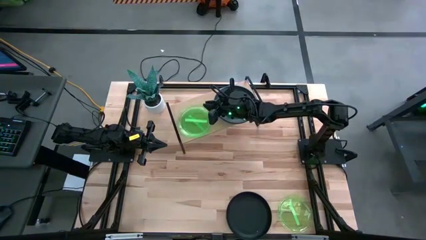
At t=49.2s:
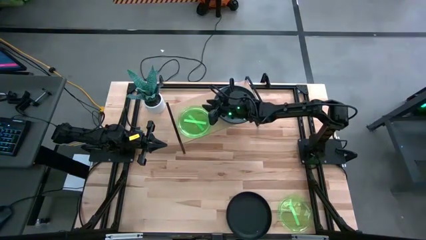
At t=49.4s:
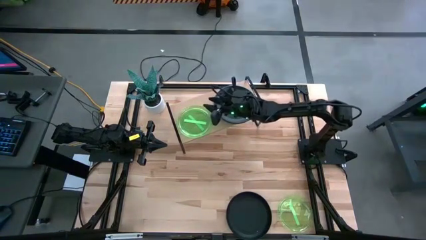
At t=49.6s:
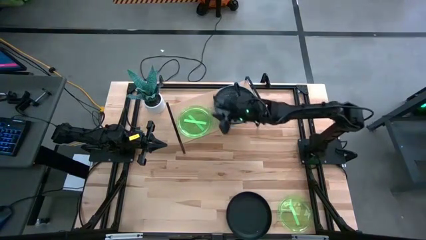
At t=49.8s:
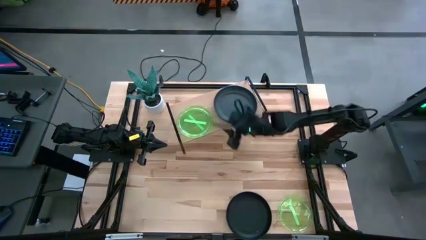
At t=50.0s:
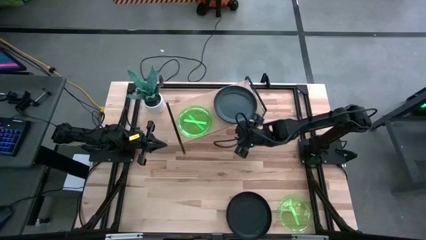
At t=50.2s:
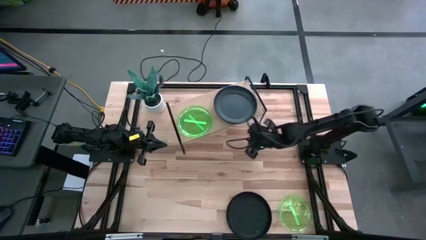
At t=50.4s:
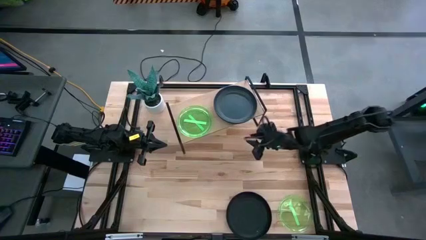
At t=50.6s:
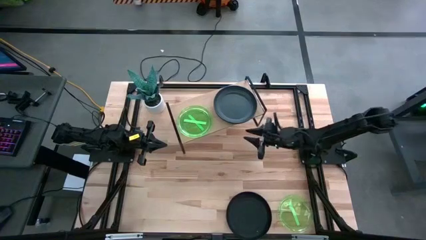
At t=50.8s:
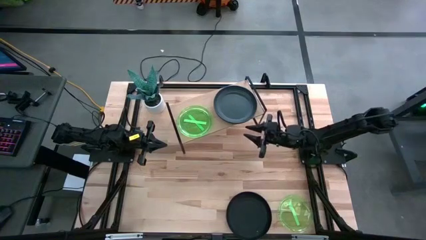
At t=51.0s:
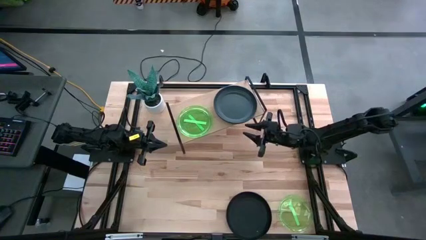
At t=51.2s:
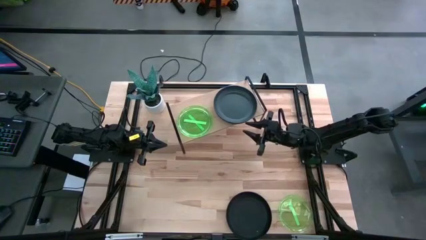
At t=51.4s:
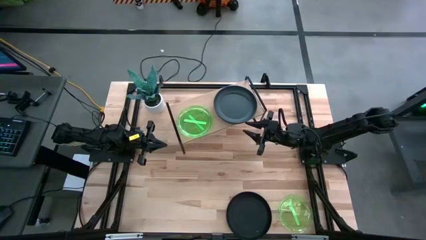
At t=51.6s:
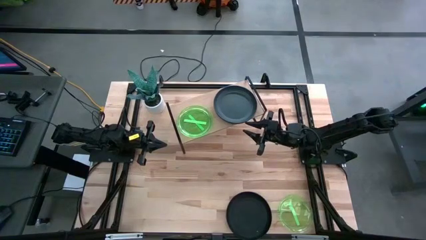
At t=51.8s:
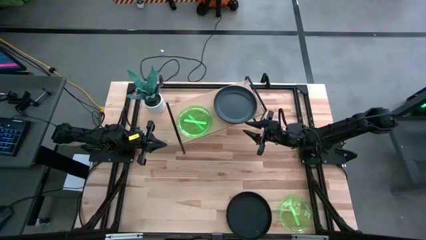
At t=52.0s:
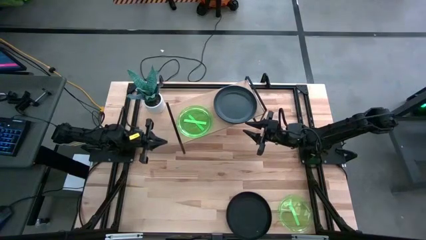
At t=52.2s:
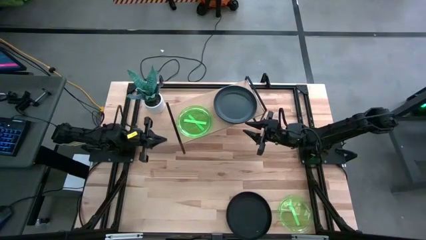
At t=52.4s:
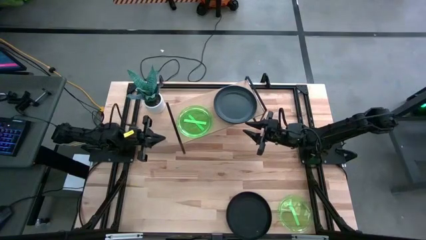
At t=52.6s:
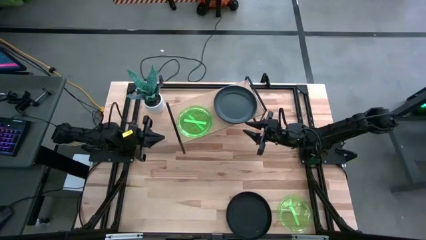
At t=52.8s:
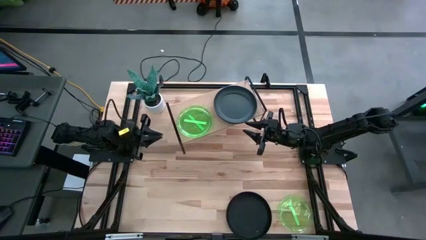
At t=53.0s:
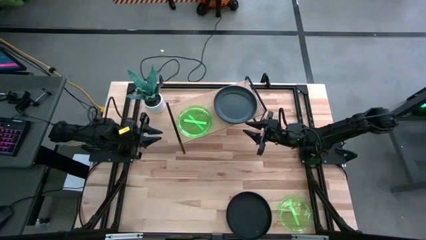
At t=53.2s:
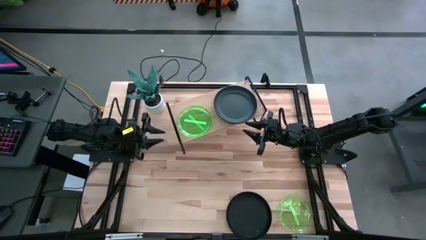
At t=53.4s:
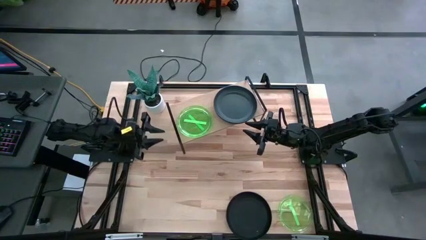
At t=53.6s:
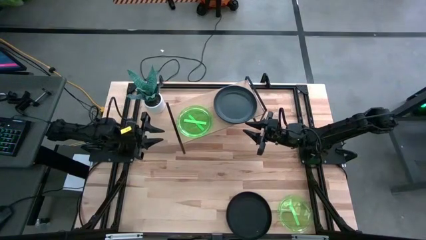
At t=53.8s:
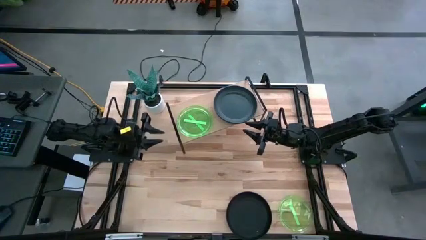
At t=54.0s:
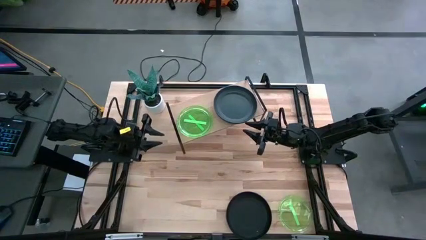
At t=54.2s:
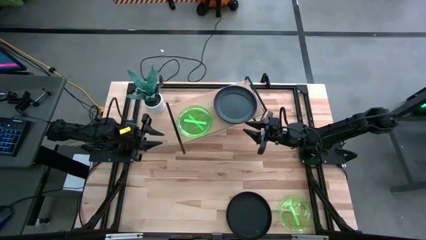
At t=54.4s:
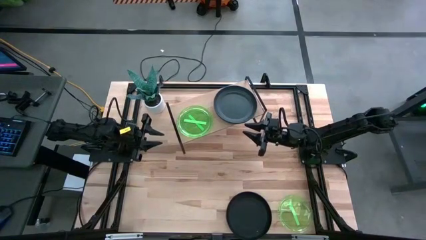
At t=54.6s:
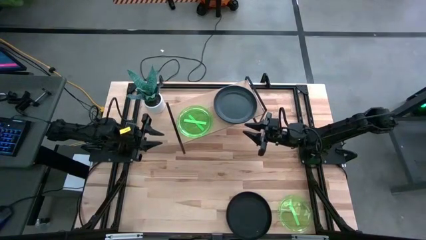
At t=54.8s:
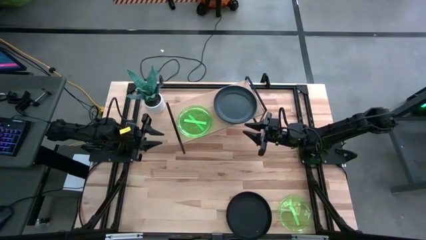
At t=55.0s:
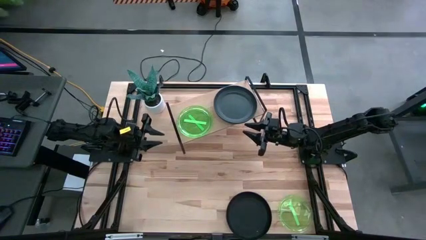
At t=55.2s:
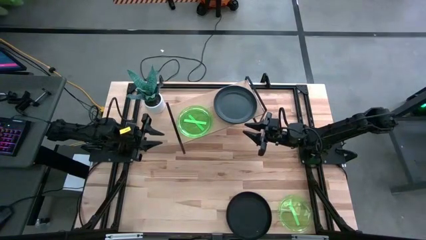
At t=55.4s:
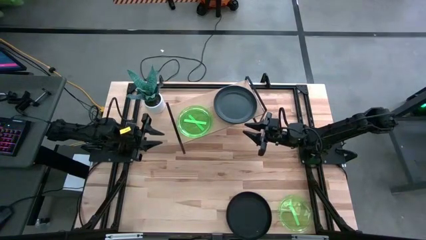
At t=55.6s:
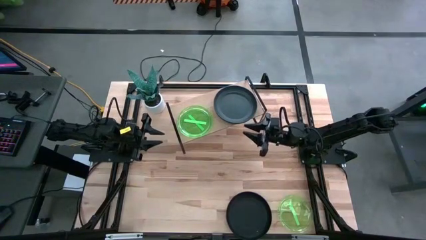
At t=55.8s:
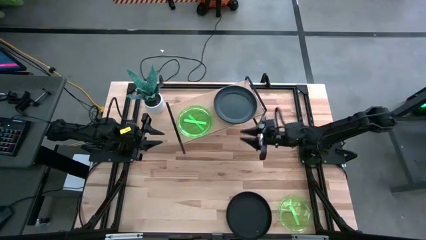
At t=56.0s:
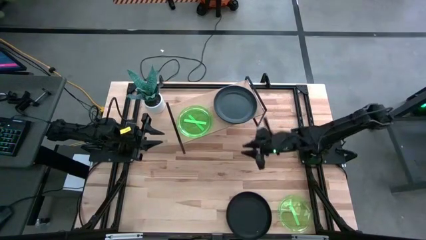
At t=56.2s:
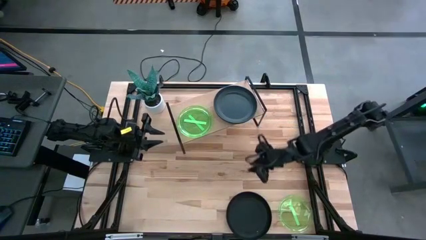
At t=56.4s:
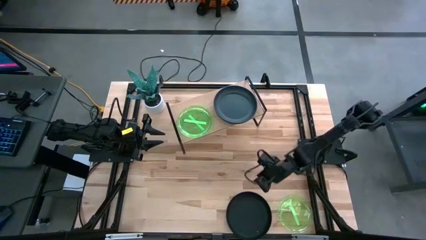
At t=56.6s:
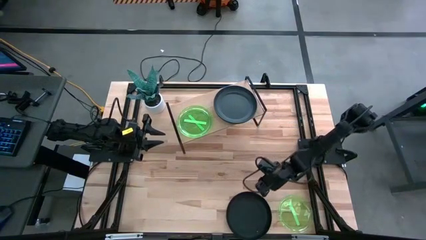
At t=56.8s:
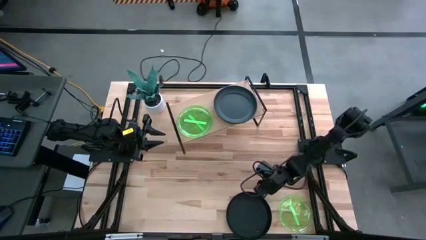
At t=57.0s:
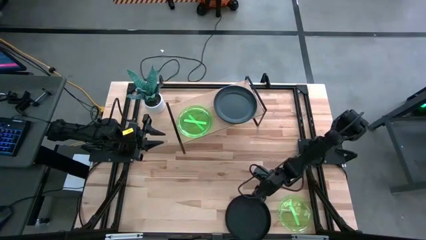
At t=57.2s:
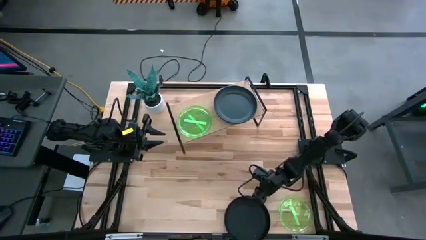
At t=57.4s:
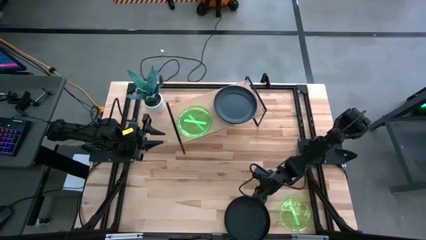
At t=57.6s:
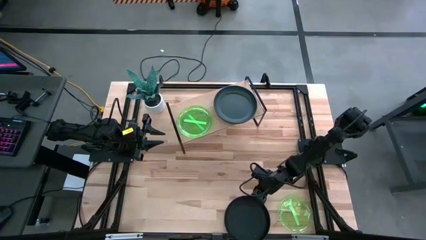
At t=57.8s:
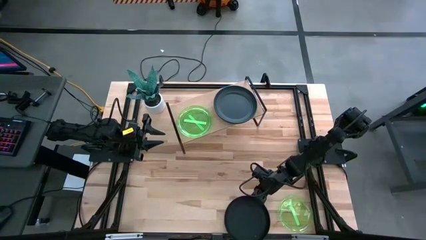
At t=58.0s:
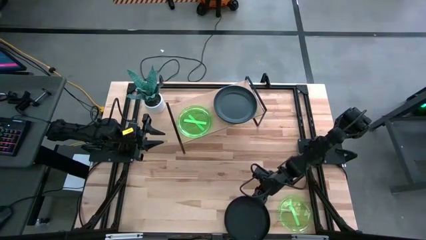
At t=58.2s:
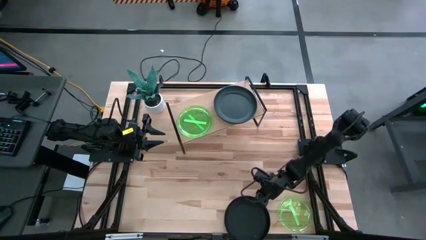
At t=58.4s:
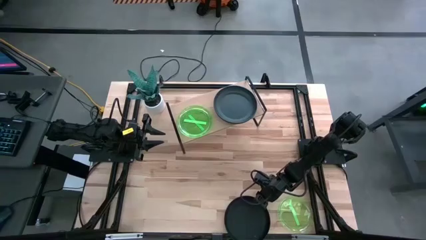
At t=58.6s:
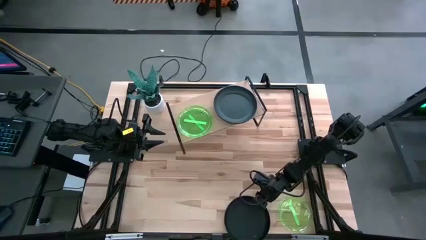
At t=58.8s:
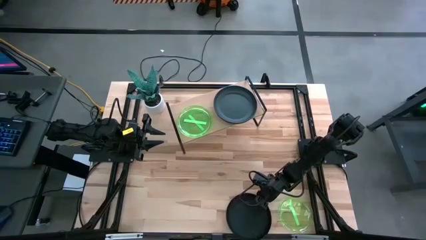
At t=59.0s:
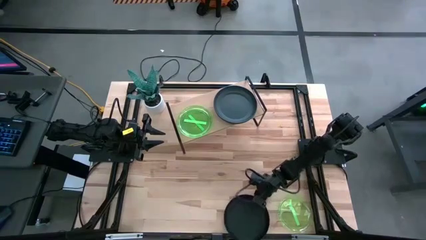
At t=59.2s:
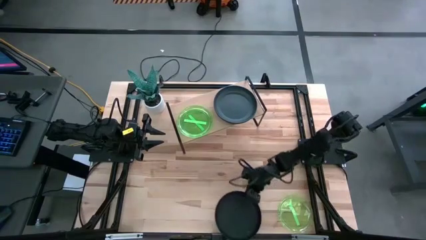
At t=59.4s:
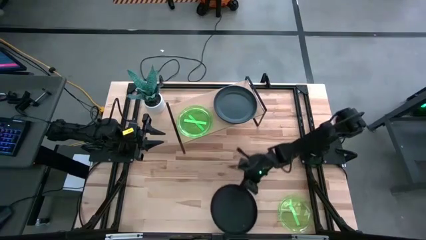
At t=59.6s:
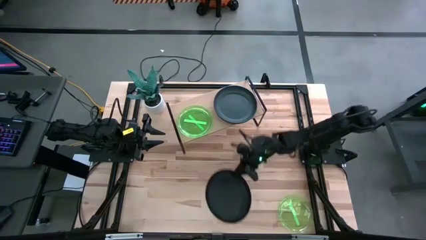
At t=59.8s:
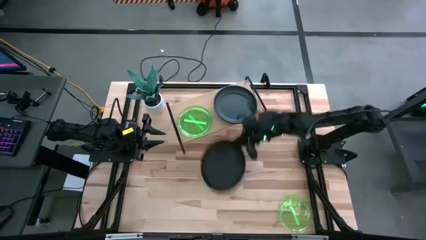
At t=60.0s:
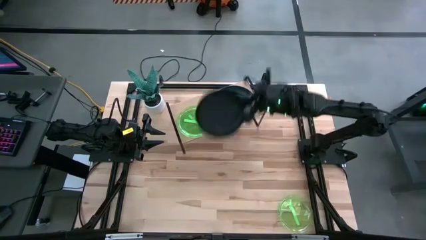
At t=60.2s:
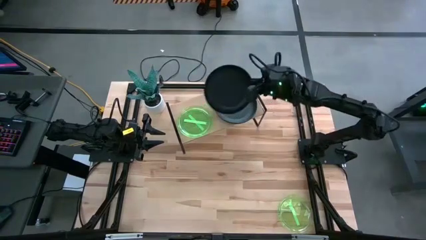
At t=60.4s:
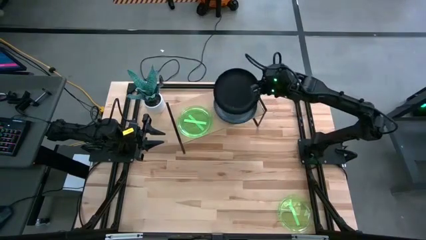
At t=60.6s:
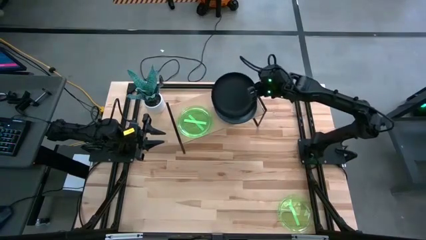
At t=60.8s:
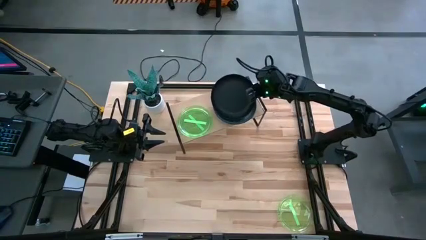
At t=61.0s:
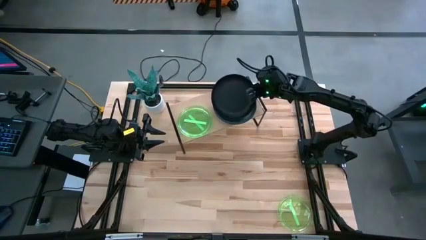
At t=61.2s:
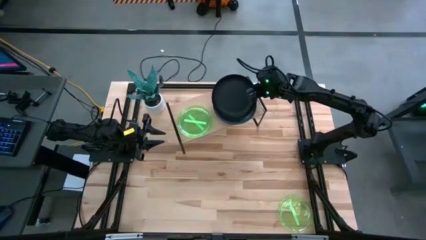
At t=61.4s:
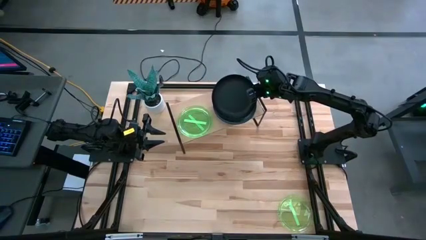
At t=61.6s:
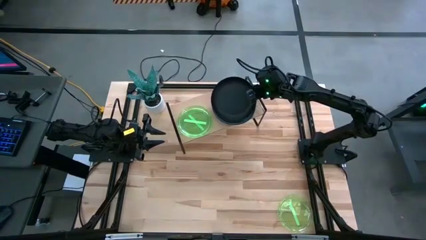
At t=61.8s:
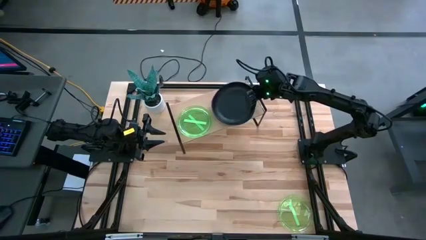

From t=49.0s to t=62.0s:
Task: Place and stack plates onto a shelf
Stack the black plate on top of the black plate on the shelf

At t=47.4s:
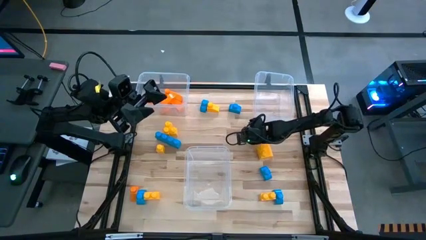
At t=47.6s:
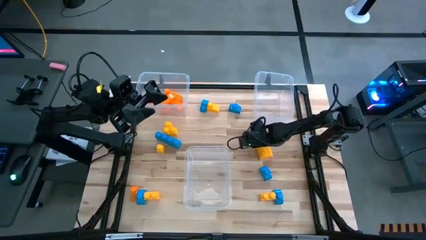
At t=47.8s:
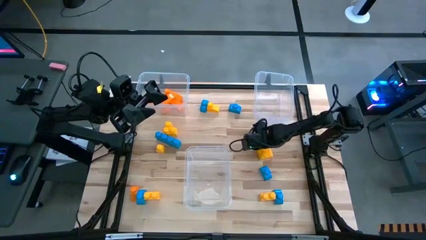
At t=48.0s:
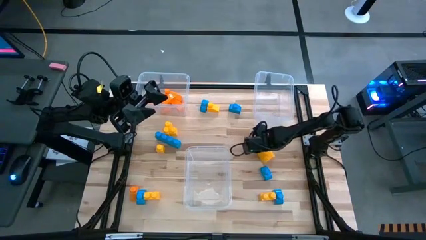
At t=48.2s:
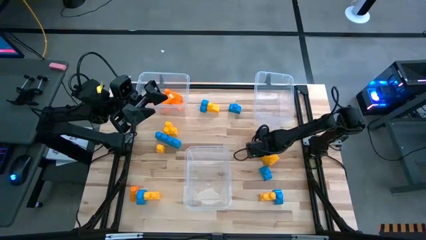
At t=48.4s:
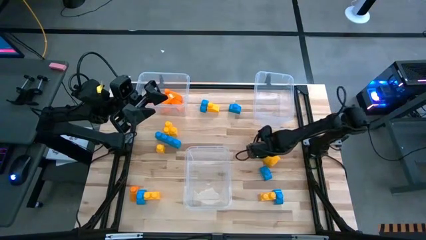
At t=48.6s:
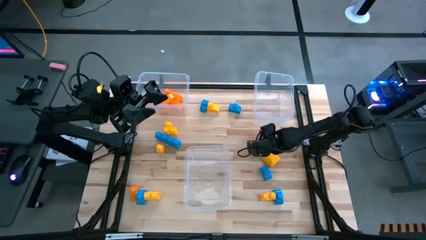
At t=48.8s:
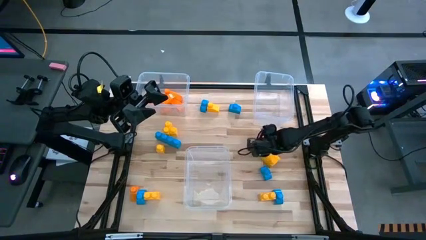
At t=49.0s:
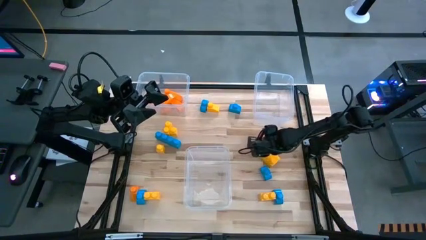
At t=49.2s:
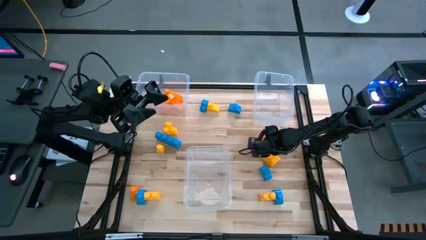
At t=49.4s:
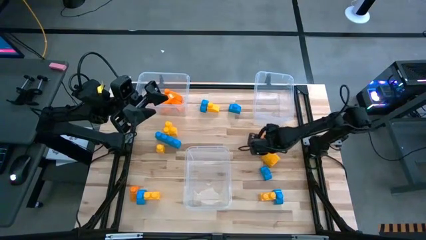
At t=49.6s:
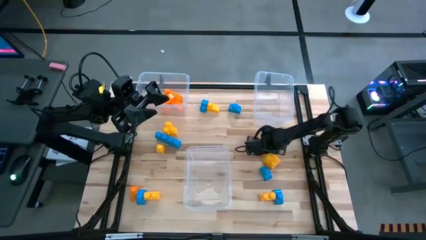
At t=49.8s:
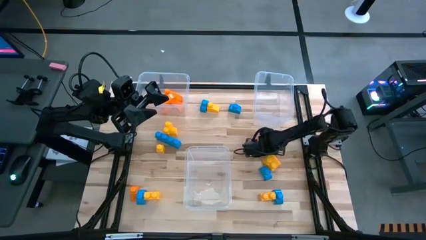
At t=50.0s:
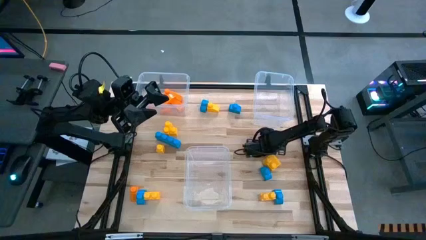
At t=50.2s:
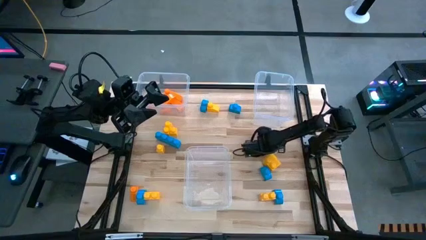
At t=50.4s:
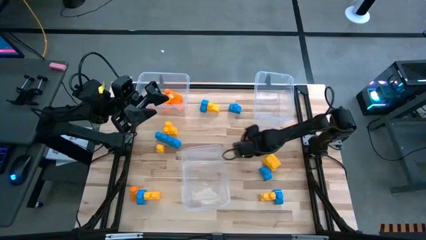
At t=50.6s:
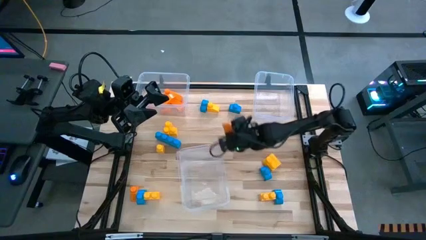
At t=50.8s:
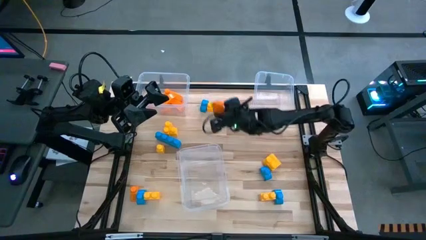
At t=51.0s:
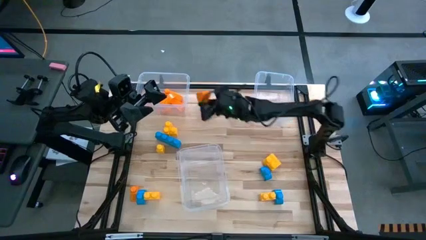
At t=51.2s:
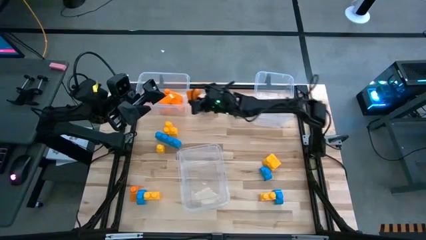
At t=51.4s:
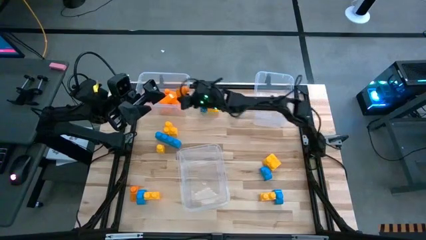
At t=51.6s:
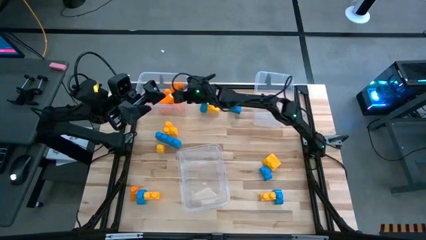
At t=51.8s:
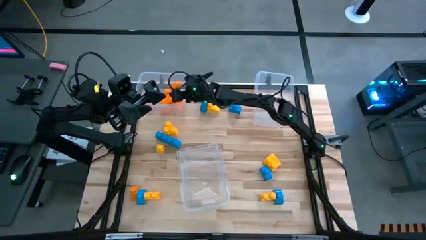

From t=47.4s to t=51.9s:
Task: Sort blocks
Put the orange game piece into the top left transparent bin
